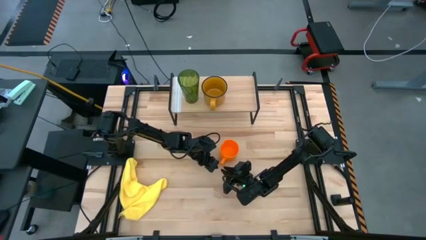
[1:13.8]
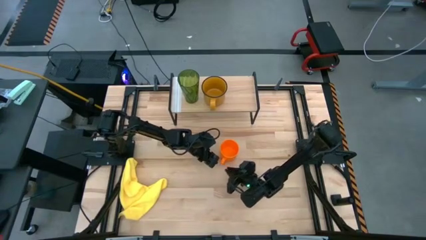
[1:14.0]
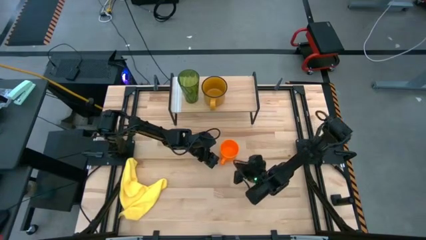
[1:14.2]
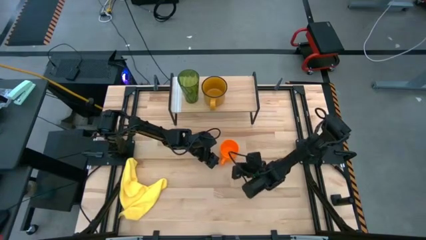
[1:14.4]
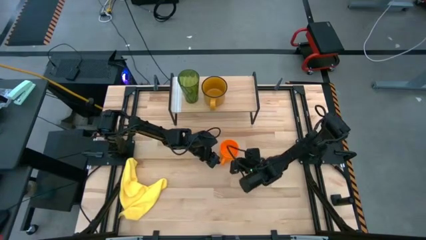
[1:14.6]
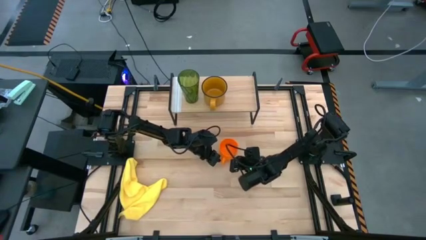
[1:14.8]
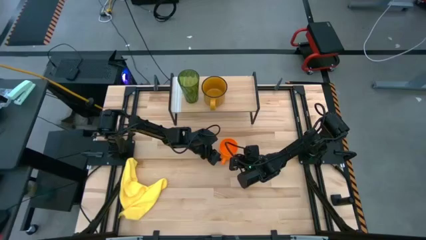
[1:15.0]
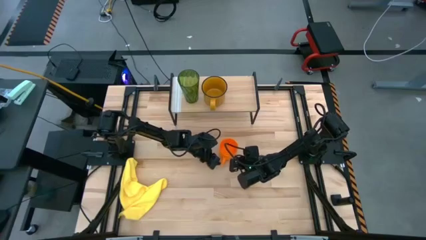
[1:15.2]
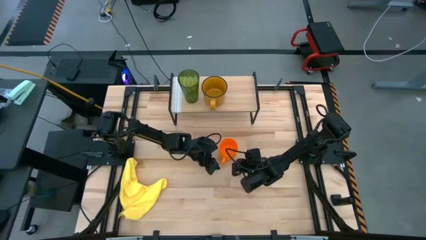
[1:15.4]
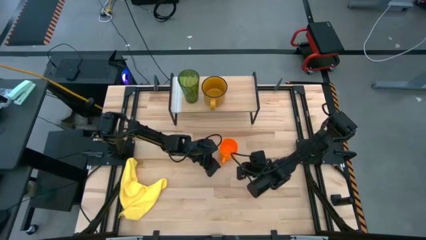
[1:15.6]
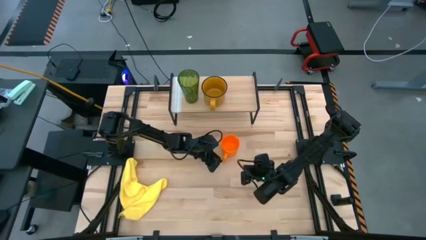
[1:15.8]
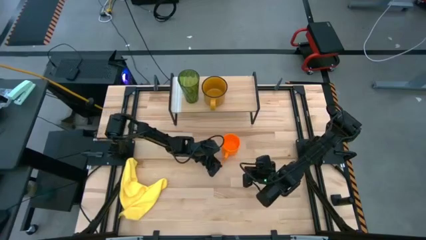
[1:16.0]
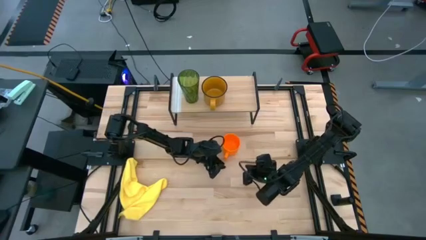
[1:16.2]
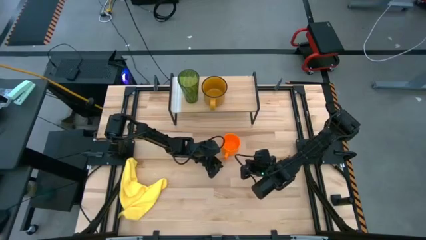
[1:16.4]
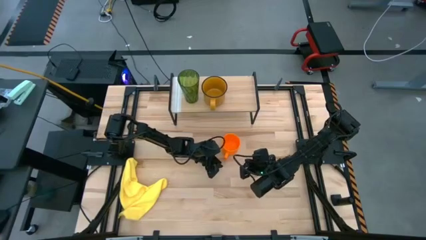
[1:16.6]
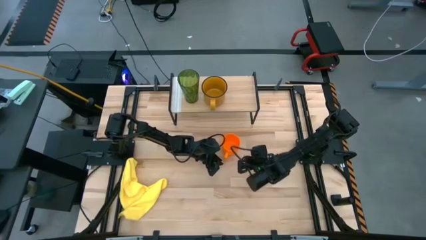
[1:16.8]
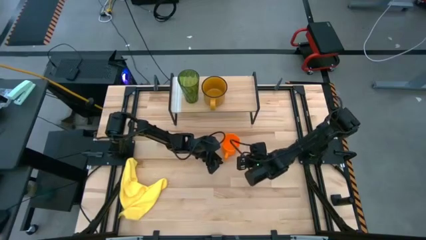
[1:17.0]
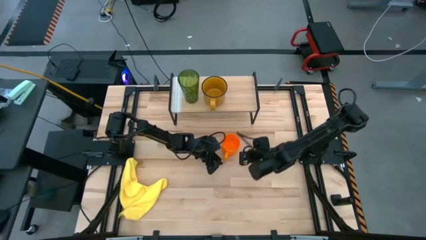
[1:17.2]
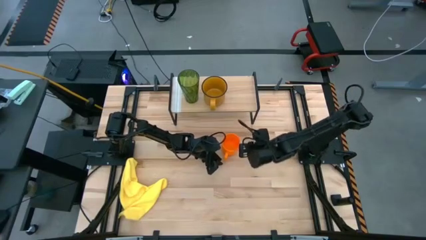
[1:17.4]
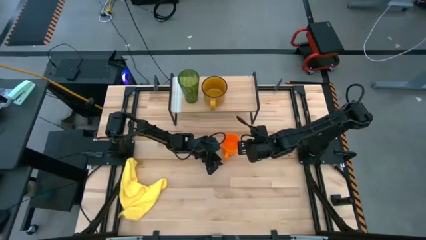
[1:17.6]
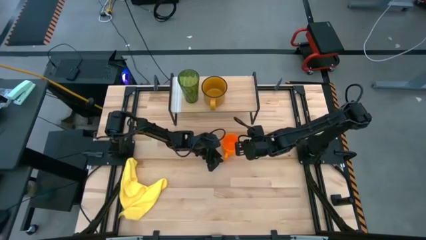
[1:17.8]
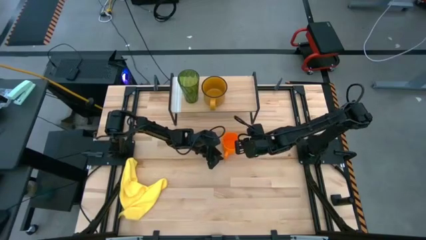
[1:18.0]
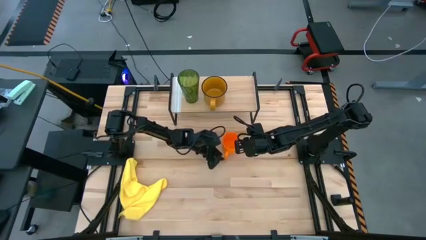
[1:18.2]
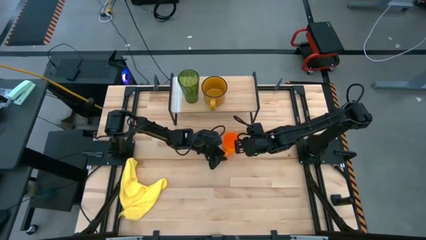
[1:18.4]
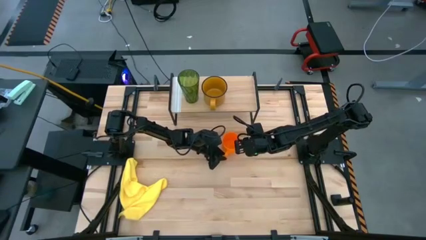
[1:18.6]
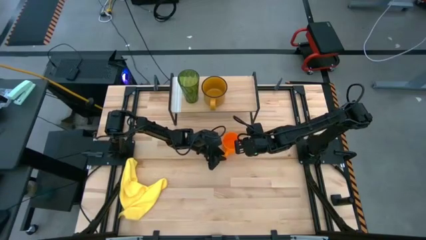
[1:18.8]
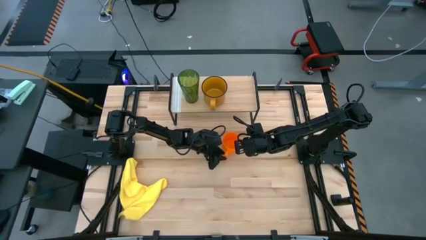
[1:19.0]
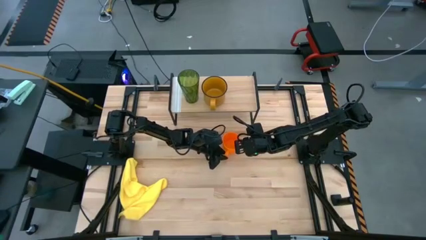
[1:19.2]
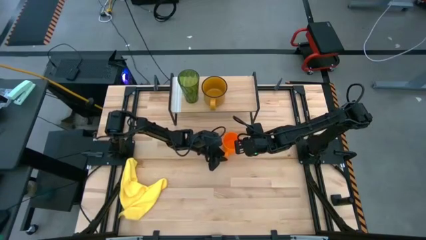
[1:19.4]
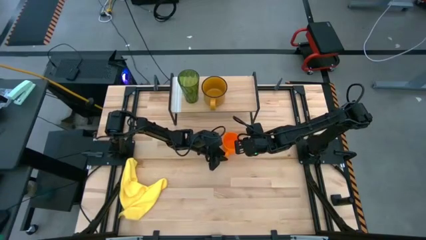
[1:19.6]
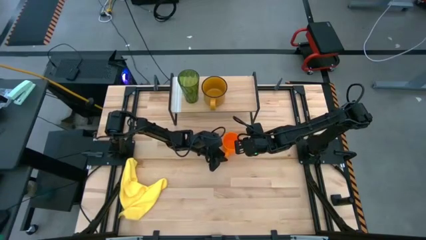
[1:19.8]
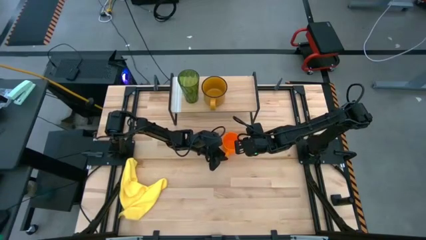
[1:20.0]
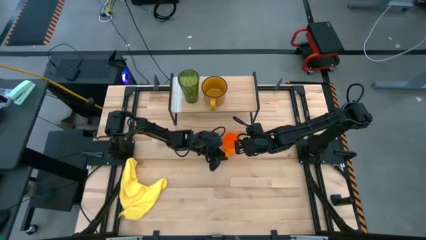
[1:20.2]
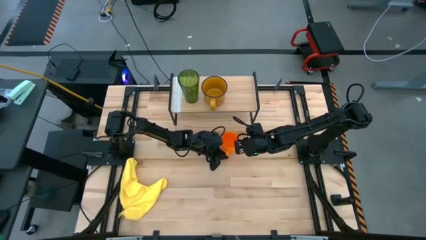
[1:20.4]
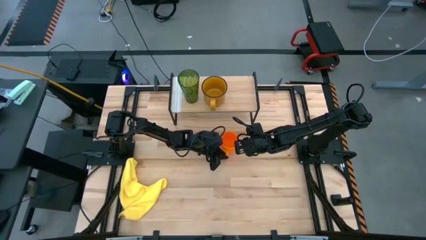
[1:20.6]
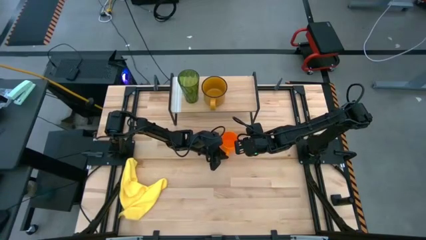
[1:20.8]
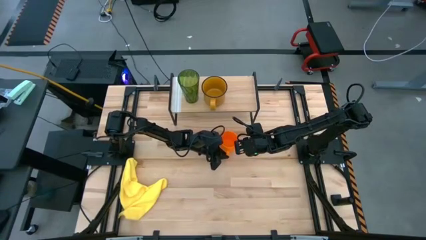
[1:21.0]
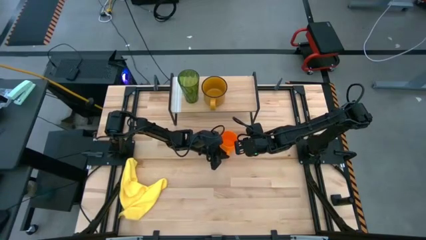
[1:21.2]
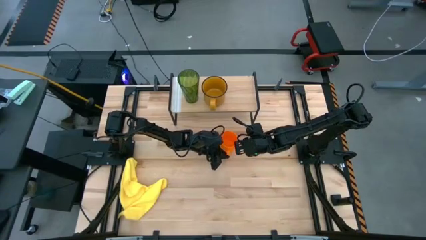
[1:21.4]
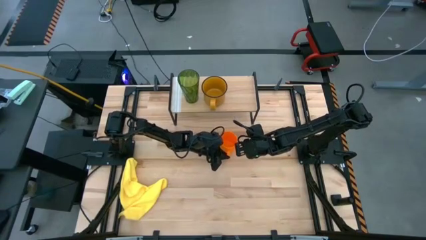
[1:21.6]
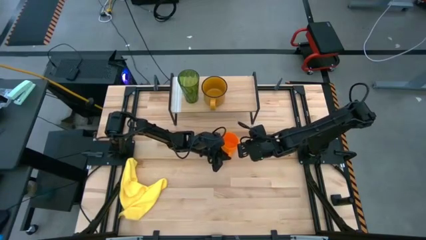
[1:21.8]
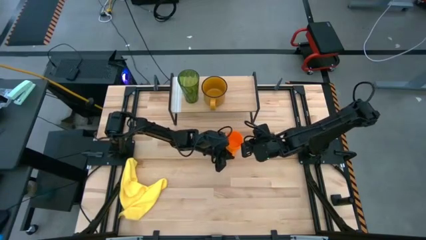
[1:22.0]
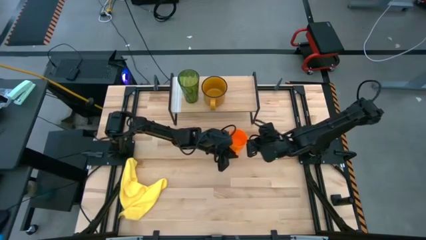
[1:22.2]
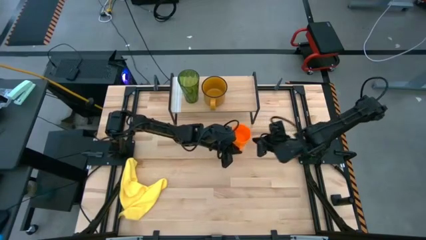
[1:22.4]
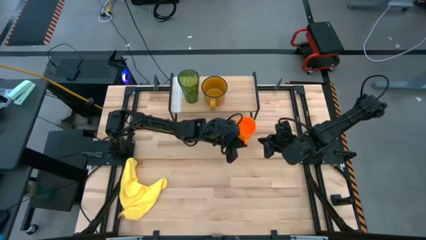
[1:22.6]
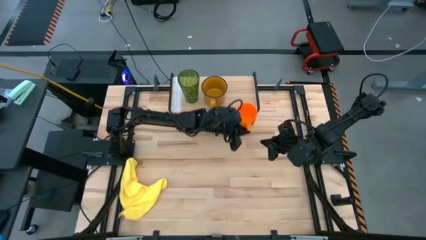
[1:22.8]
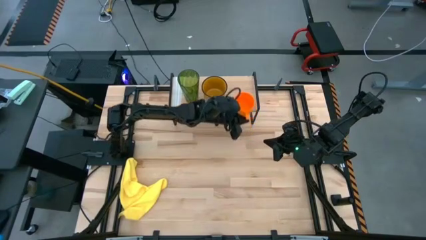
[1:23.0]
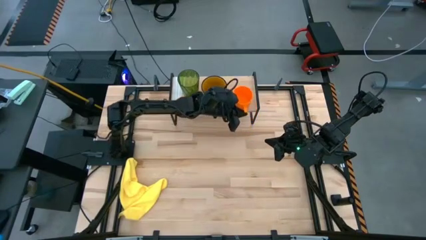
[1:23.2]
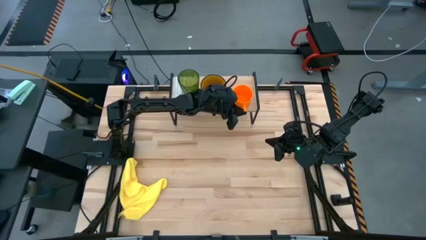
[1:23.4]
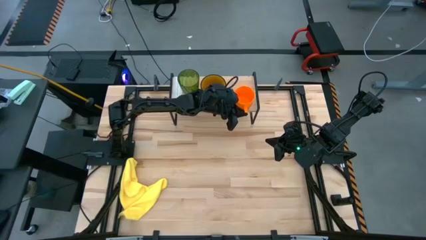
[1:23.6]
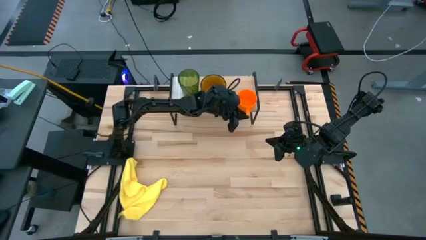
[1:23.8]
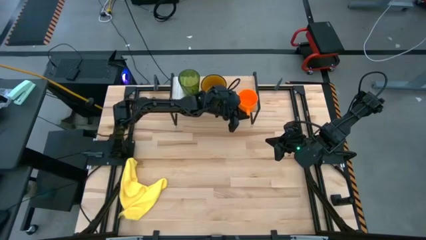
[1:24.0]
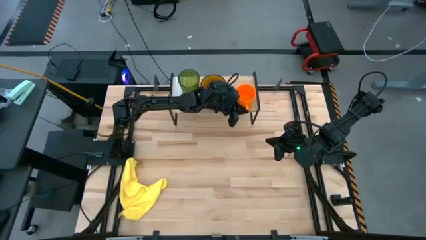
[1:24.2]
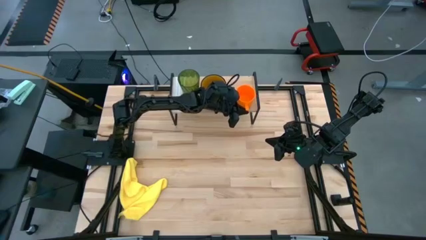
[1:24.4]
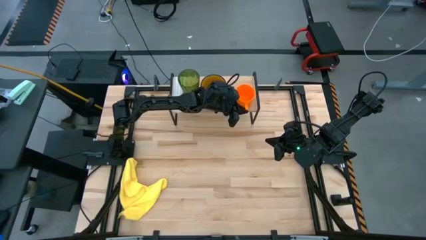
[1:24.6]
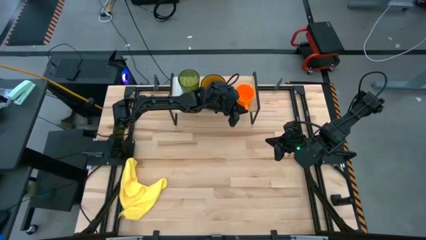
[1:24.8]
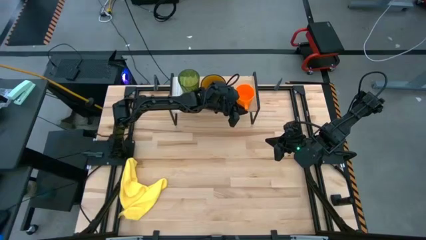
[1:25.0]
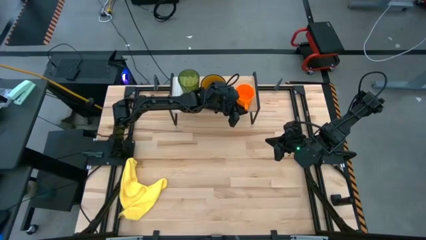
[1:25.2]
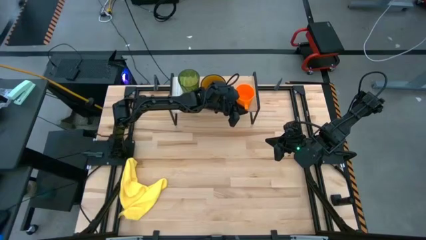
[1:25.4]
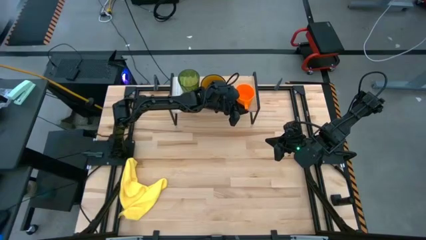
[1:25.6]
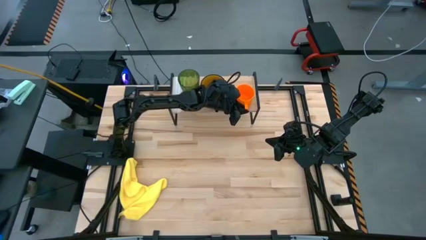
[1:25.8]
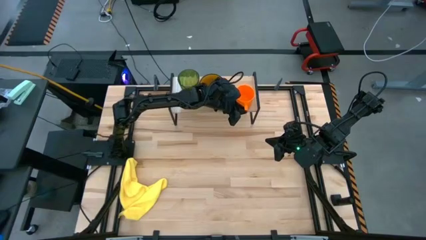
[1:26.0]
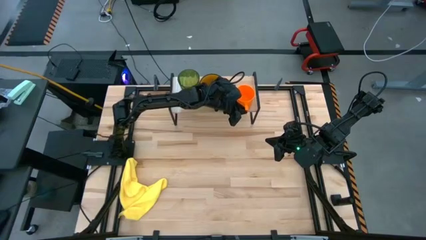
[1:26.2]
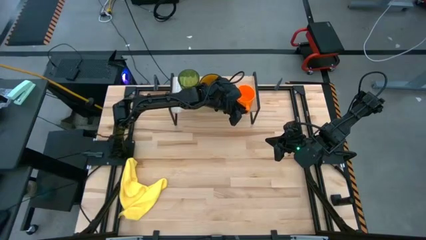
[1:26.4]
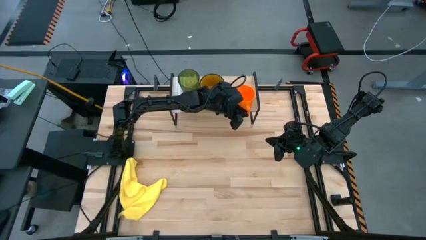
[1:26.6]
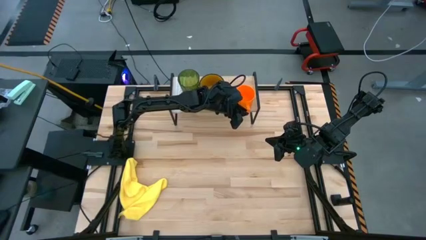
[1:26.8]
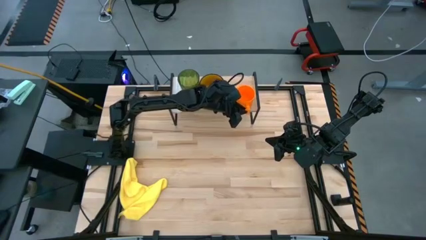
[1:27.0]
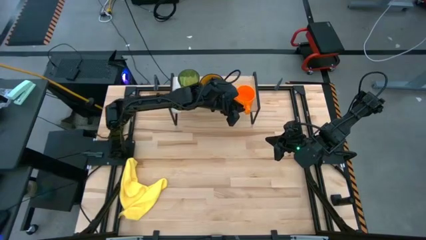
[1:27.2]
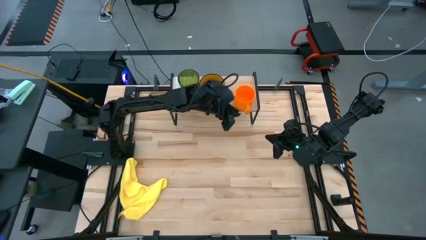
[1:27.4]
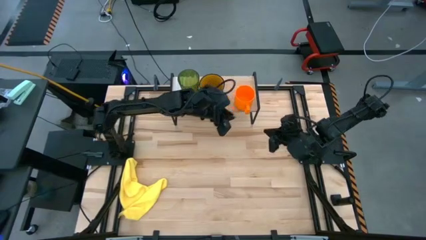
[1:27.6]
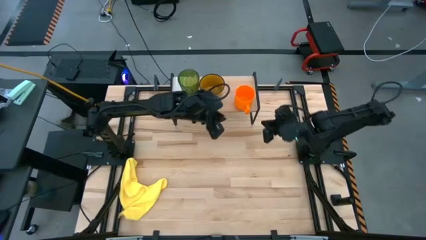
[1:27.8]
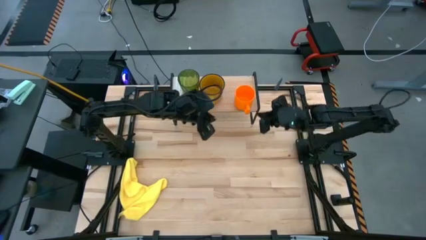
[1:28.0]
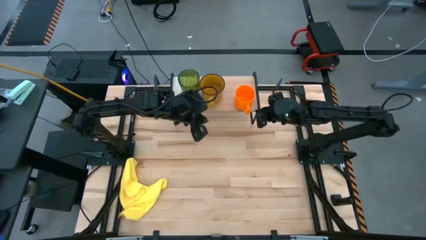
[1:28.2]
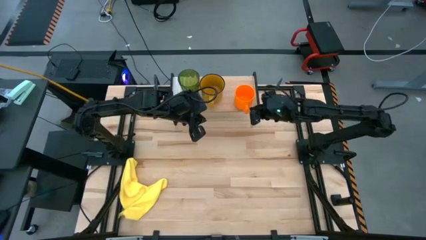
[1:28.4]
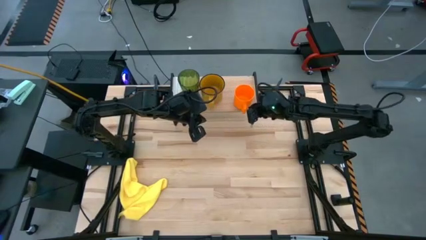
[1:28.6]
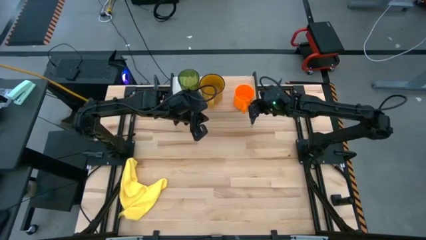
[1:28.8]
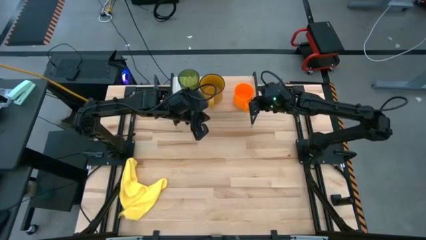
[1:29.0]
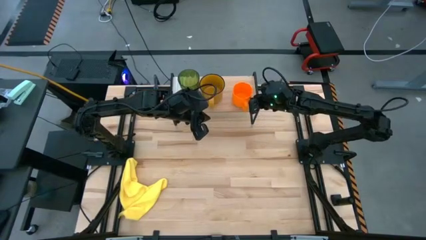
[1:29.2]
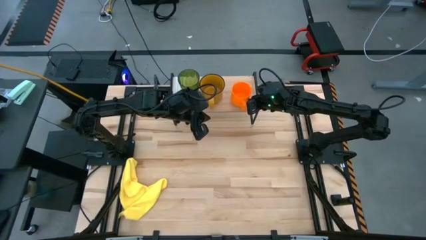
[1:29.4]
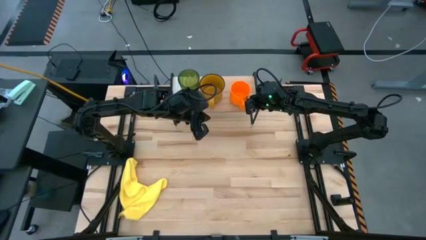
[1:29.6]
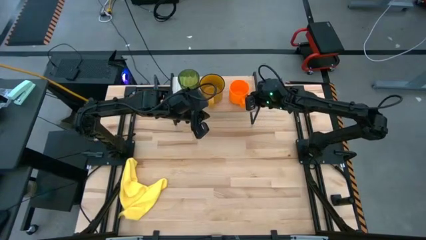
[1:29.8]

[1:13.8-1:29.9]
Task: Stack small to large cups/mugs on shelf
Put the orange mug on the shelf

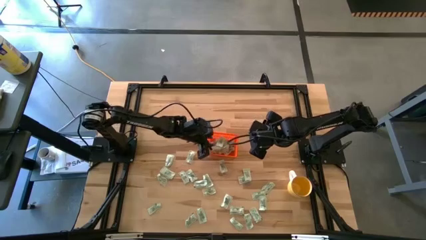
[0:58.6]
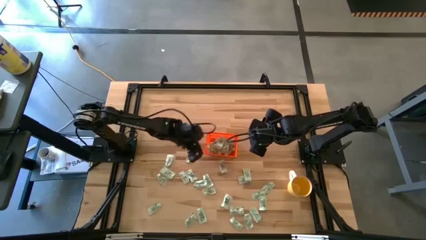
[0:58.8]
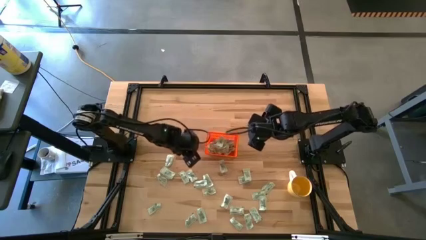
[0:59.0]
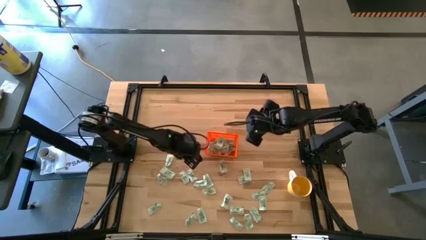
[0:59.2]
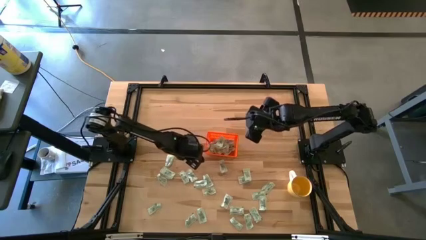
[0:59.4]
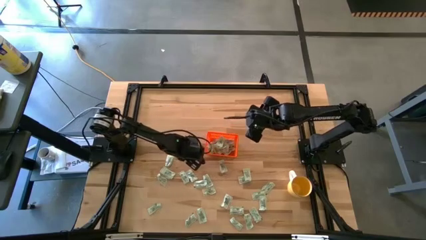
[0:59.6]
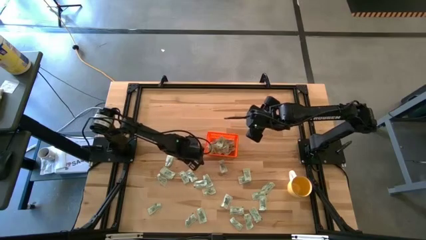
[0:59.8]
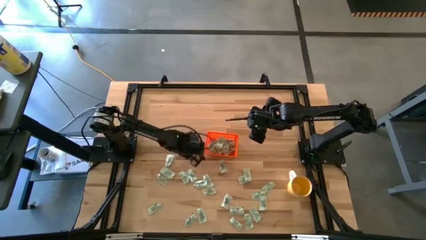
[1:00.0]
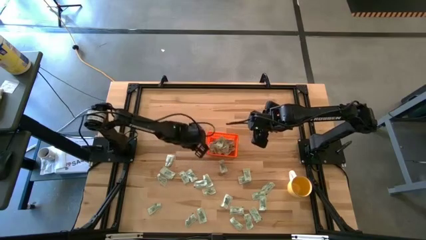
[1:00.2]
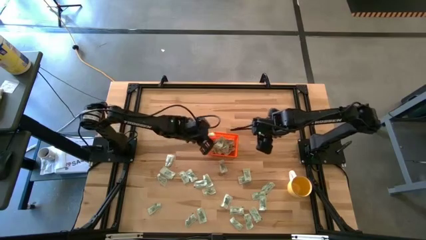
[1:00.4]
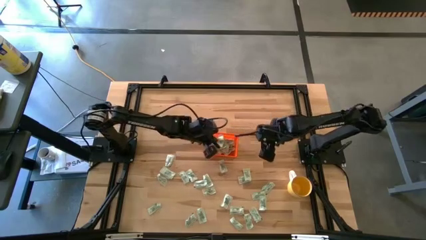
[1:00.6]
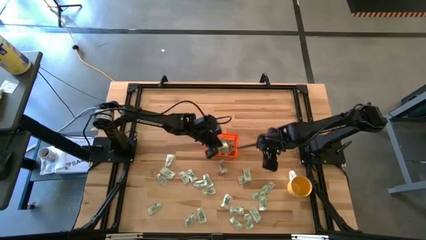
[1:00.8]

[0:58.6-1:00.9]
Task: Pick and place Stevia / Truvia into bins
Put the light green stevia packet into the orange bin
